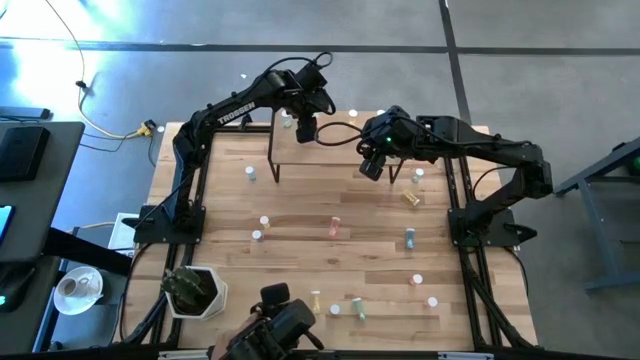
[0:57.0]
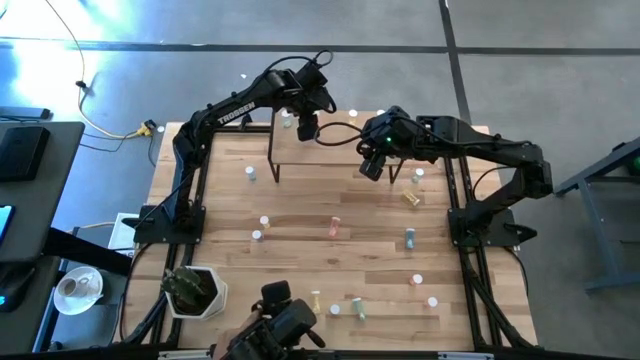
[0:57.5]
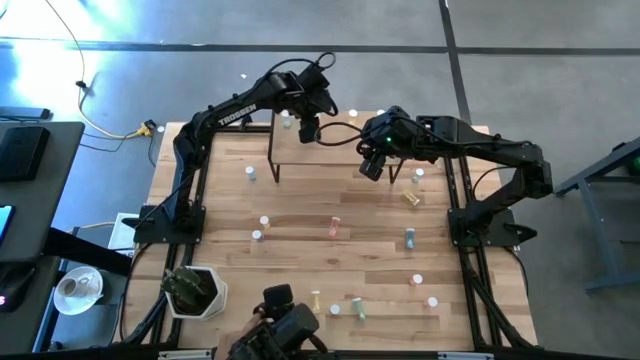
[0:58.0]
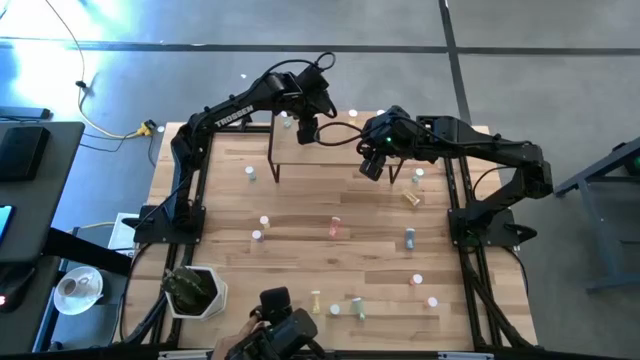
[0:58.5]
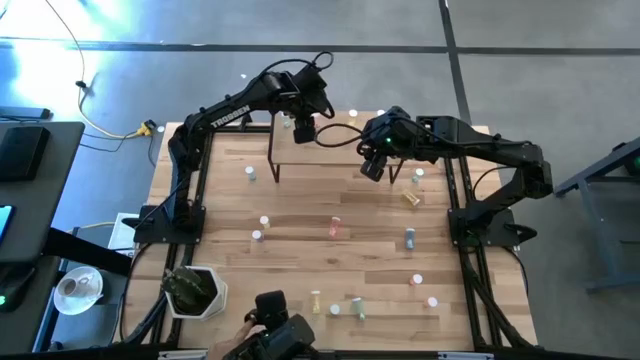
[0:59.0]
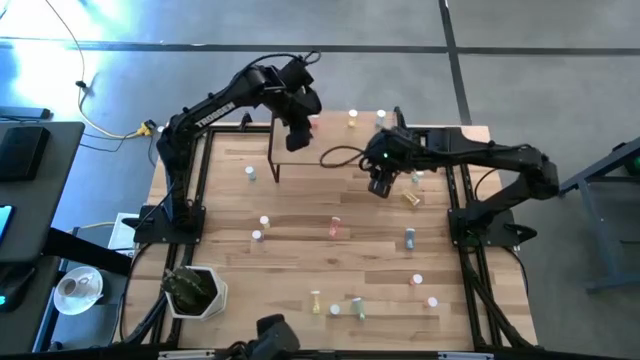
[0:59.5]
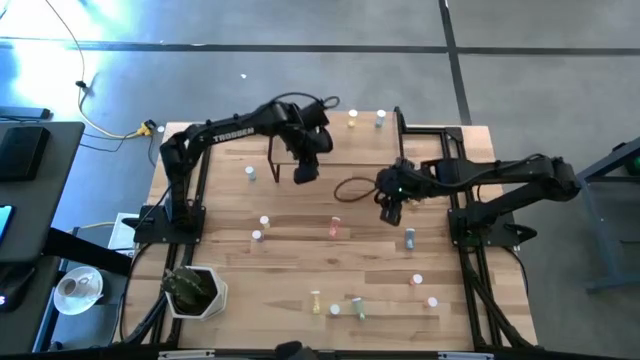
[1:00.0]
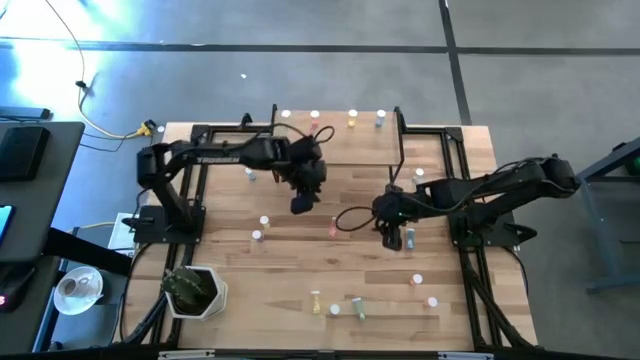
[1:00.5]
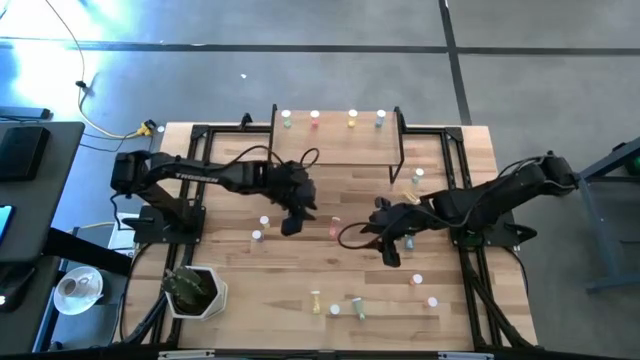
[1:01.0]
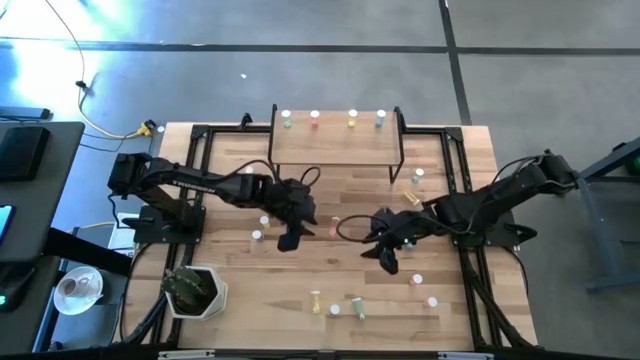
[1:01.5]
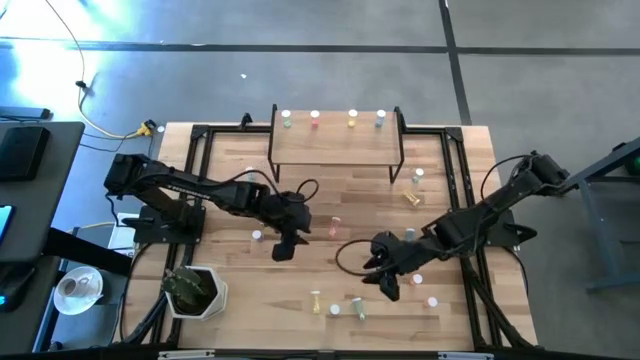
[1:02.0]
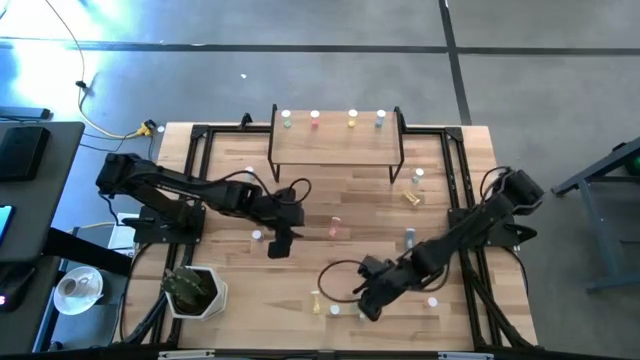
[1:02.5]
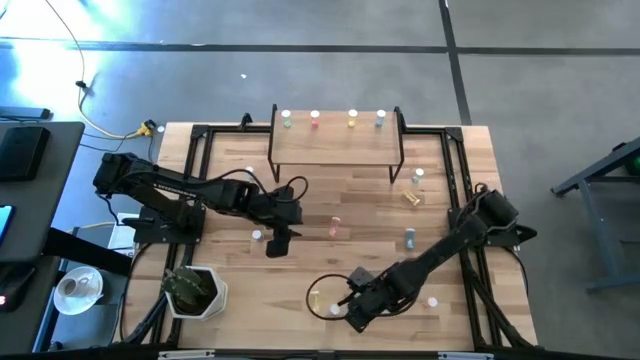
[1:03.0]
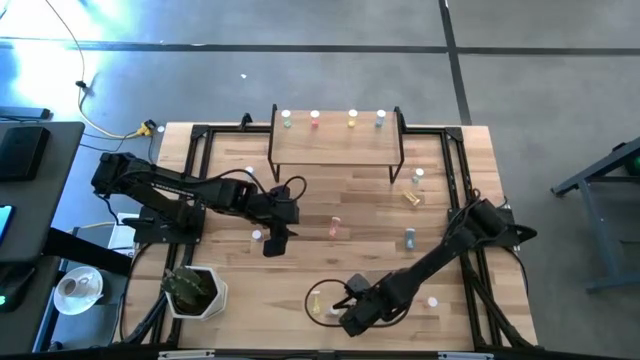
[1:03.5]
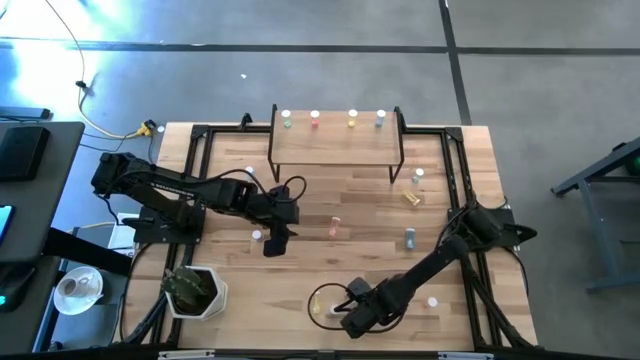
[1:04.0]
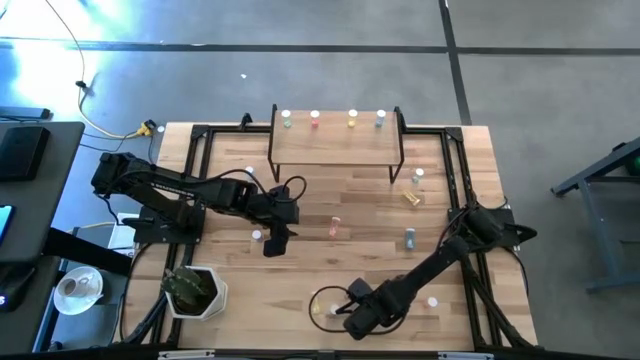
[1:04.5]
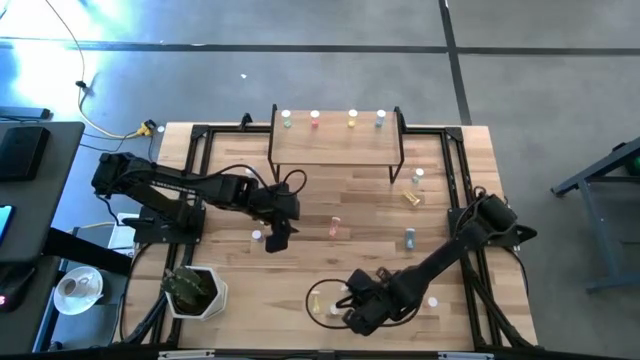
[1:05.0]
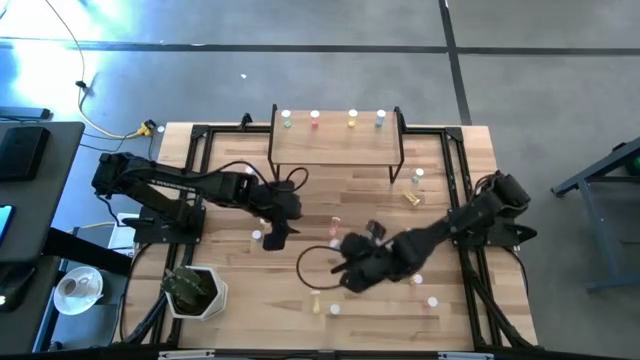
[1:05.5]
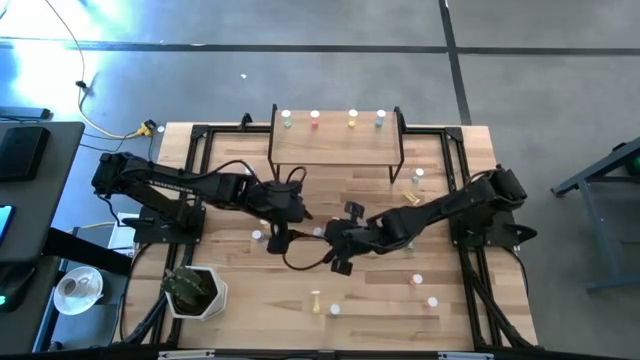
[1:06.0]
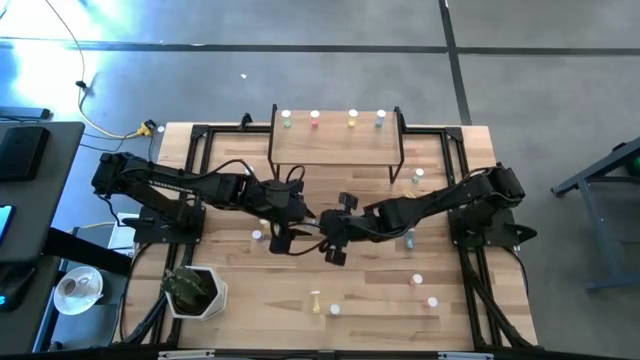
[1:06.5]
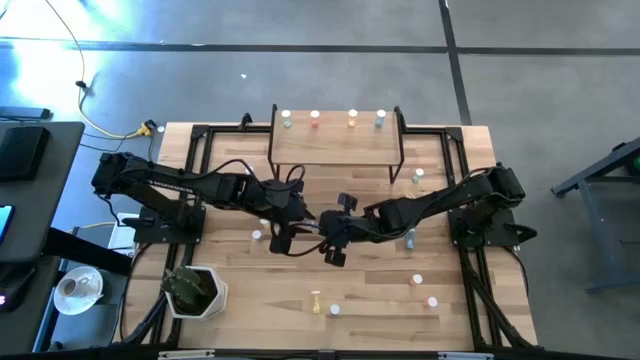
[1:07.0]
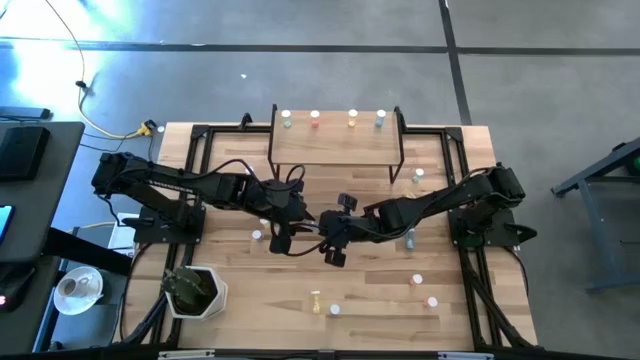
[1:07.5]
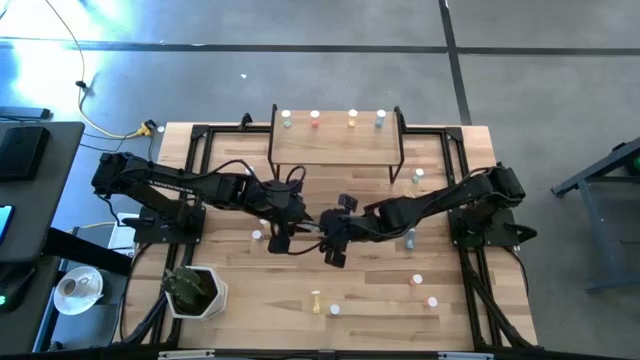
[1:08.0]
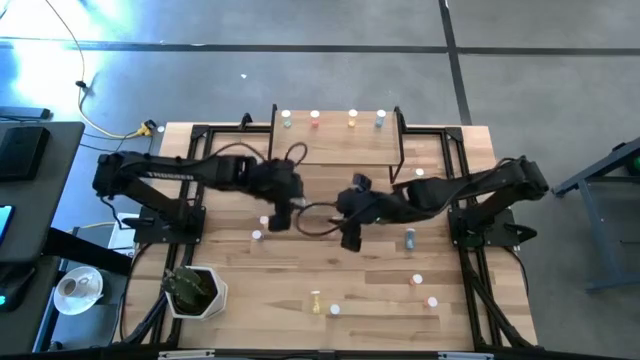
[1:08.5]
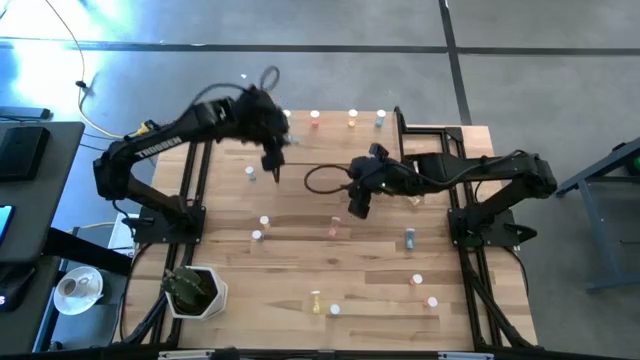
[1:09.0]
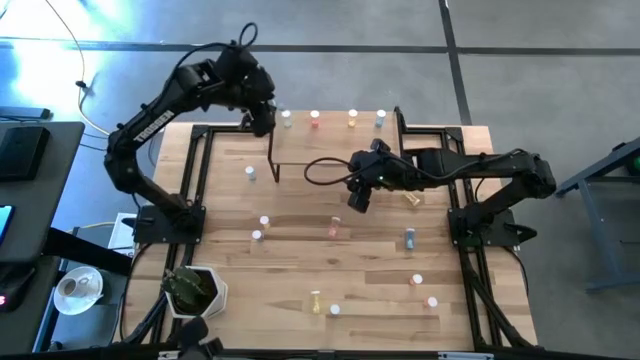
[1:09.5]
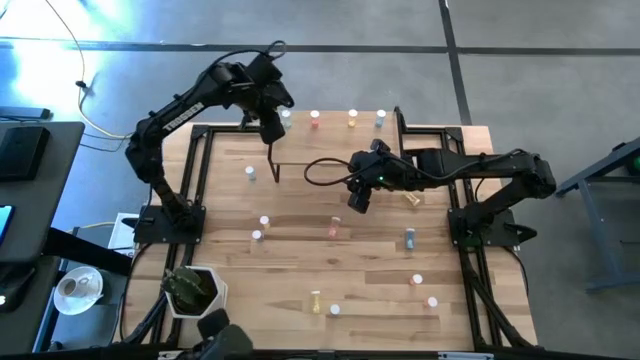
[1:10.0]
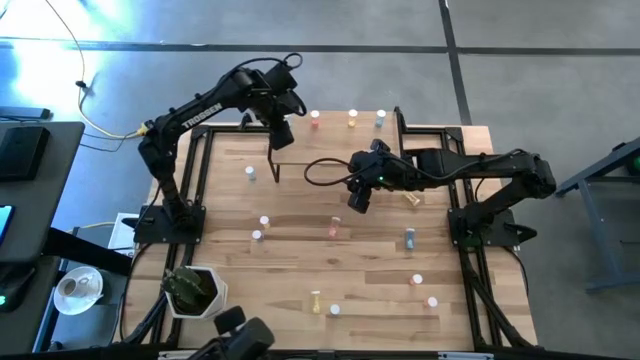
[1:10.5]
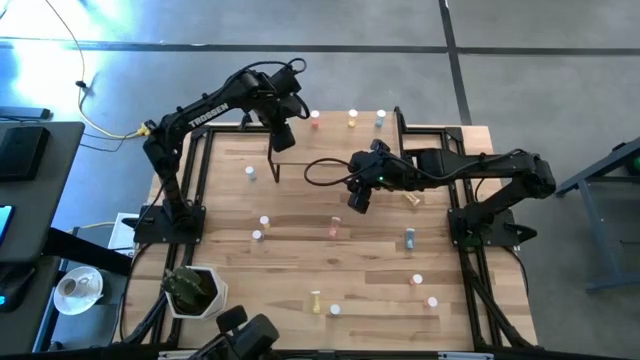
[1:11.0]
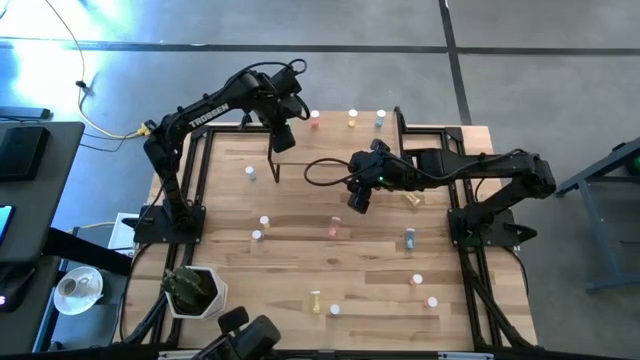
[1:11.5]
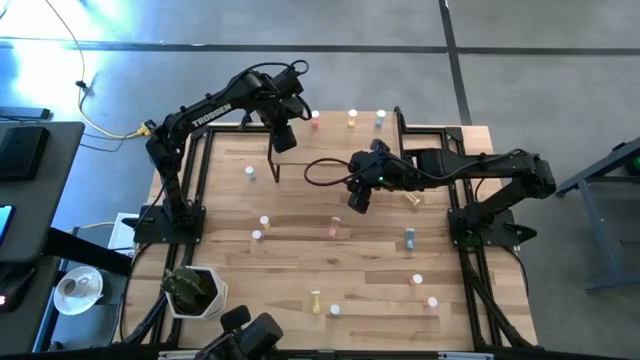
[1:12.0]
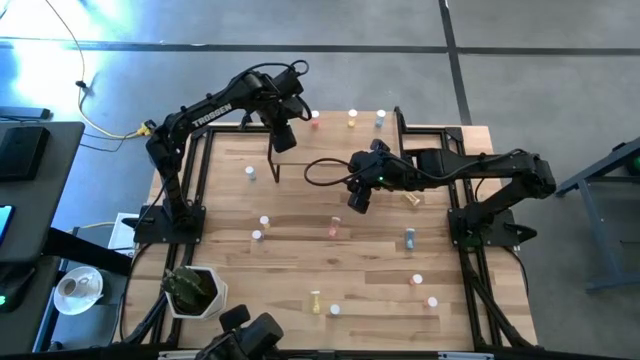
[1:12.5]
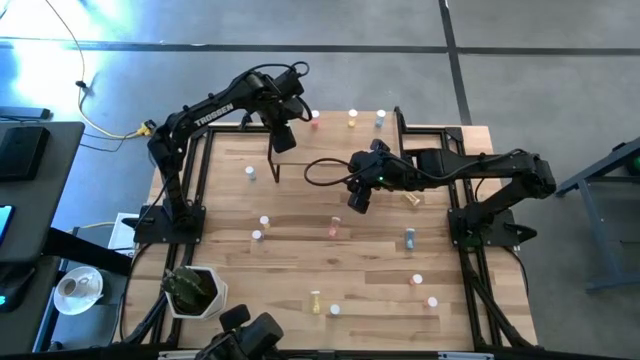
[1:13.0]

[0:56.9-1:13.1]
Task: Pick and place medicine bottles onto shelf by color
Put the green pill bottle on the shelf

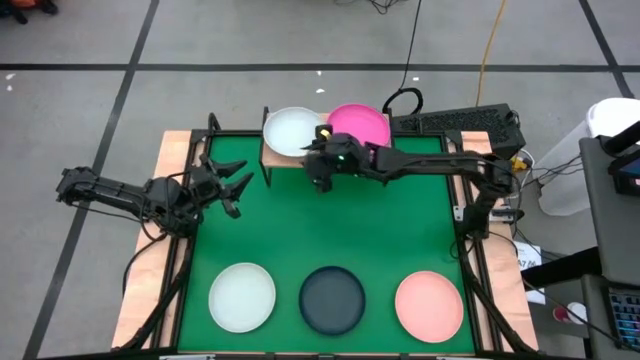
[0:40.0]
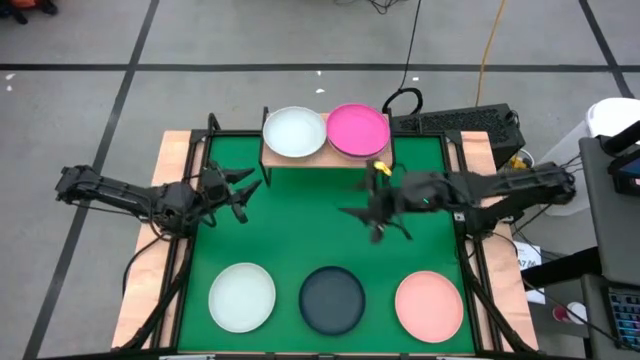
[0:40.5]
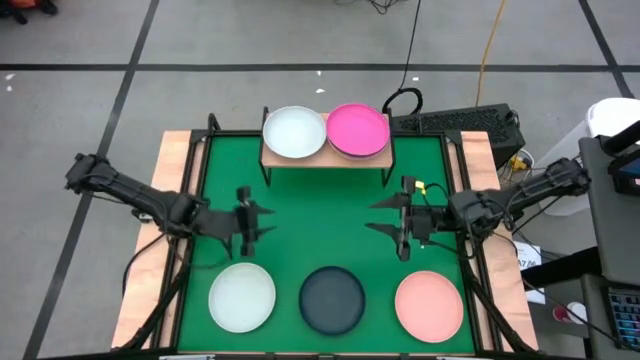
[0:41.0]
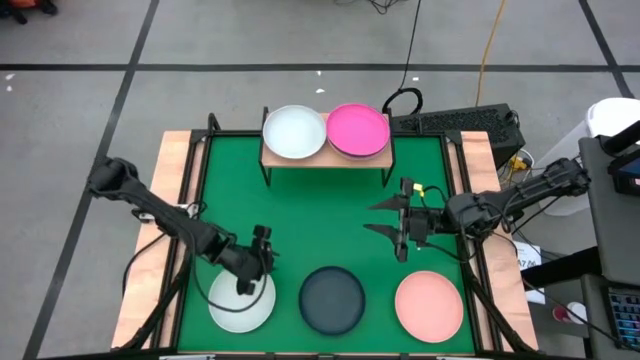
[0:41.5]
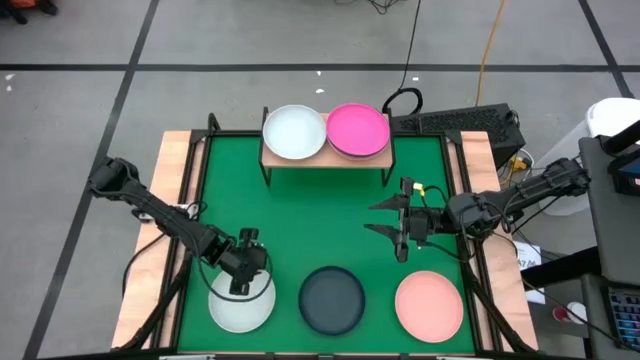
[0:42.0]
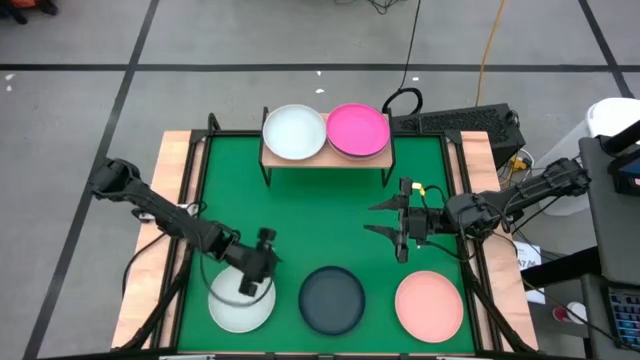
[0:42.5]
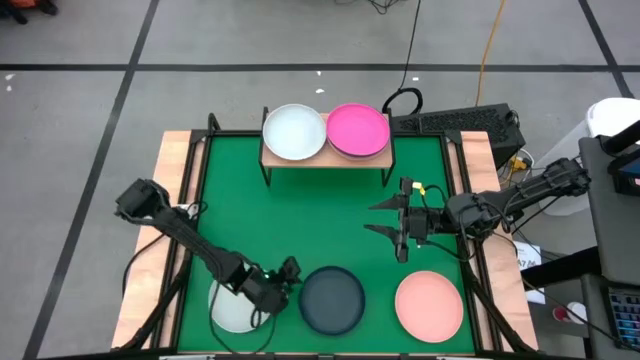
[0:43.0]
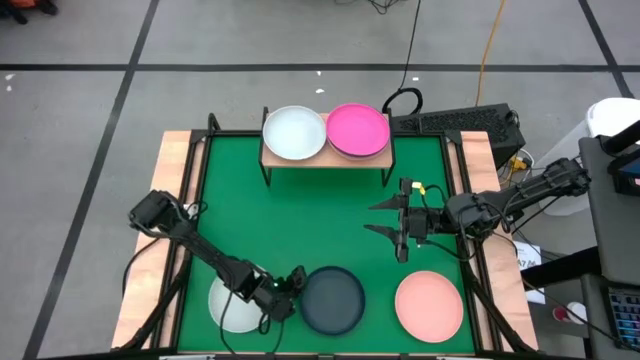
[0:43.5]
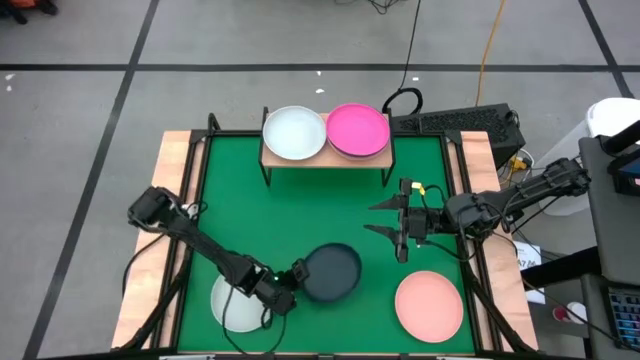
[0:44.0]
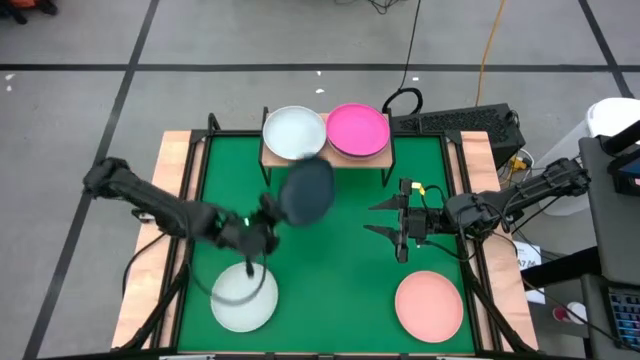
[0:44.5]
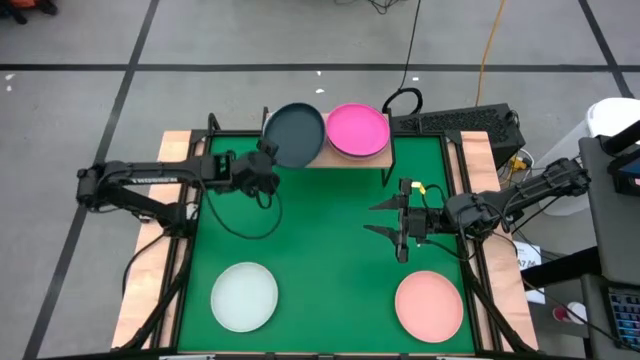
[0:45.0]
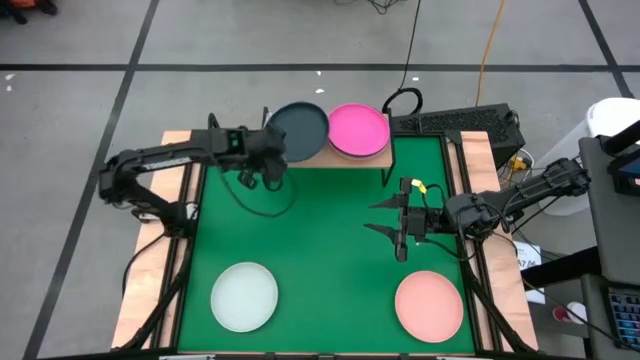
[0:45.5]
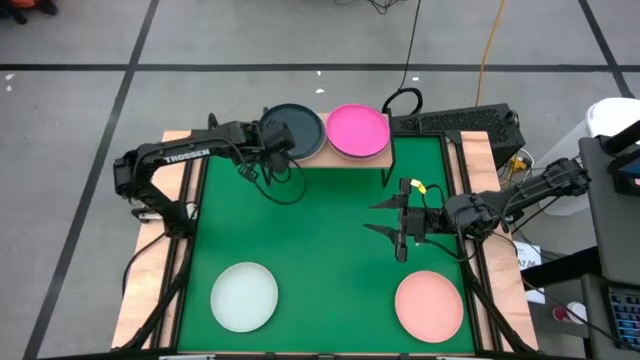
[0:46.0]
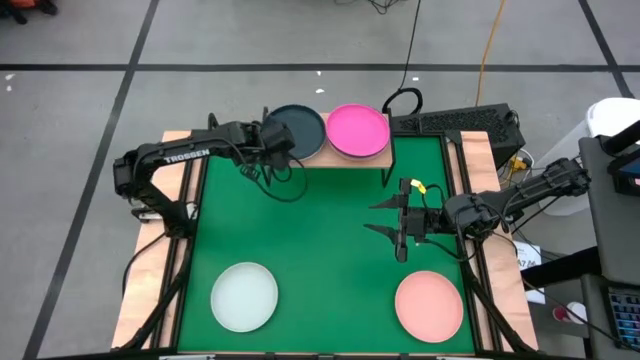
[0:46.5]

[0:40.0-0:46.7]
Task: Place and stack plates onto a shelf
Stack the dark blue plate on the white plate on the shelf
